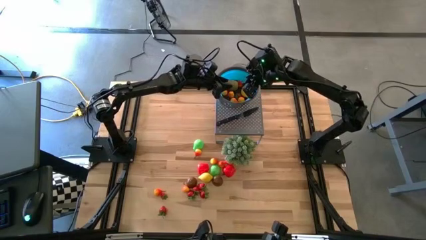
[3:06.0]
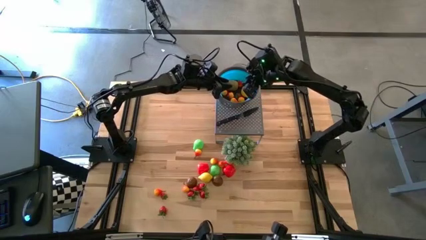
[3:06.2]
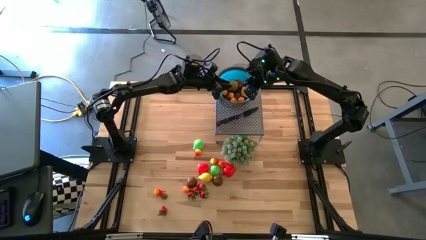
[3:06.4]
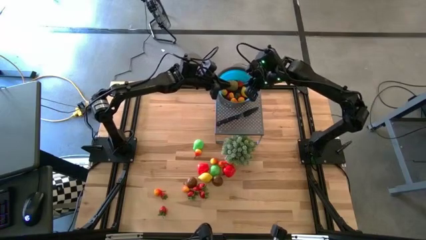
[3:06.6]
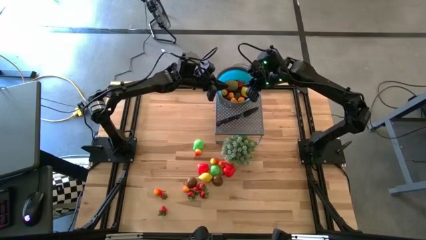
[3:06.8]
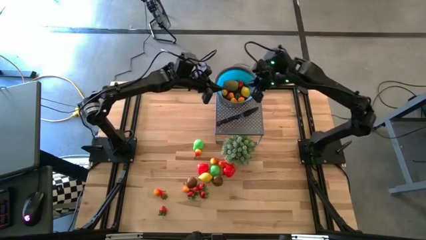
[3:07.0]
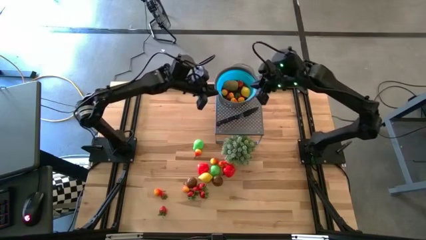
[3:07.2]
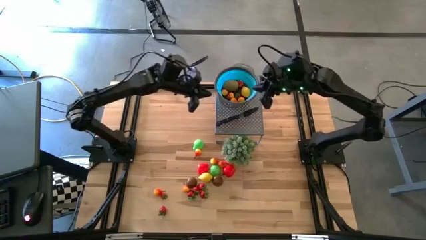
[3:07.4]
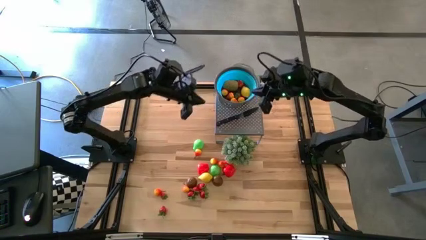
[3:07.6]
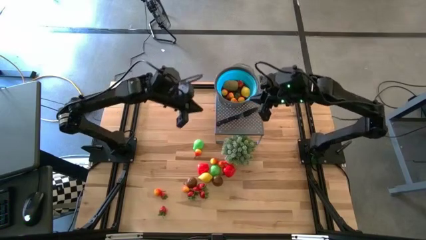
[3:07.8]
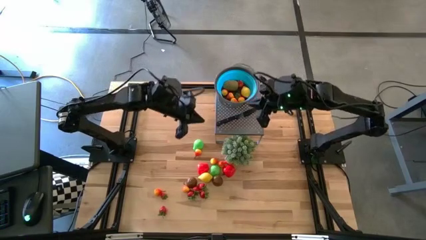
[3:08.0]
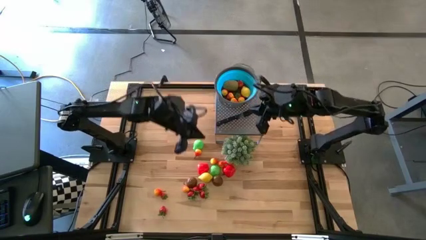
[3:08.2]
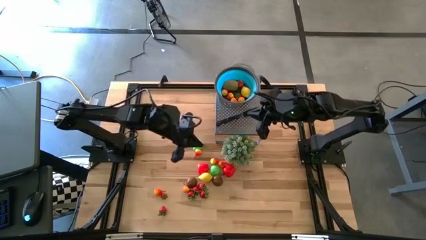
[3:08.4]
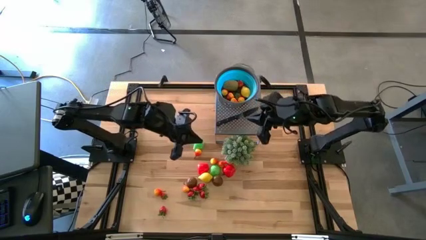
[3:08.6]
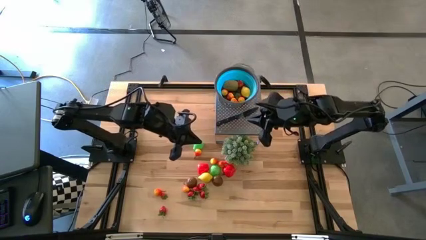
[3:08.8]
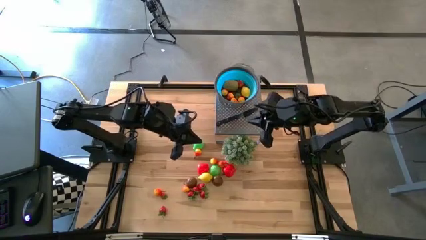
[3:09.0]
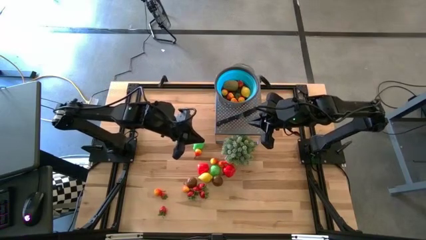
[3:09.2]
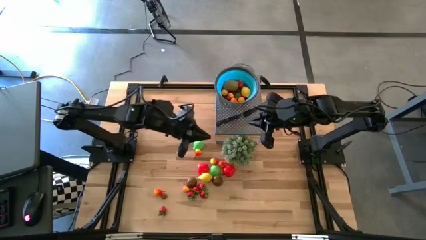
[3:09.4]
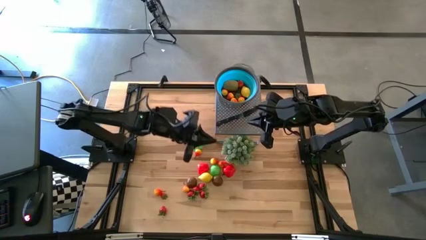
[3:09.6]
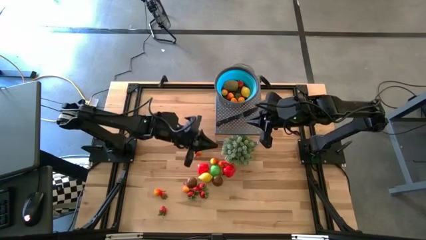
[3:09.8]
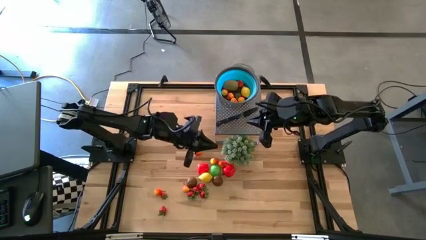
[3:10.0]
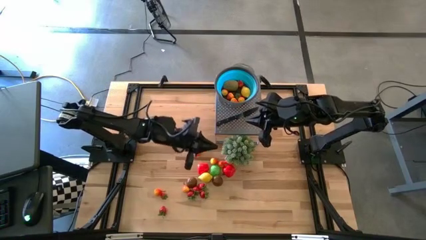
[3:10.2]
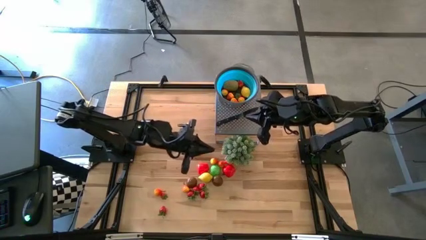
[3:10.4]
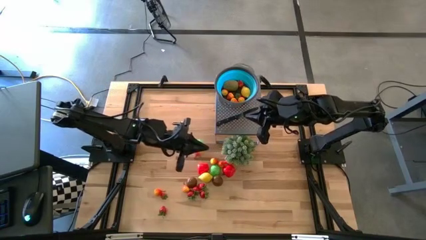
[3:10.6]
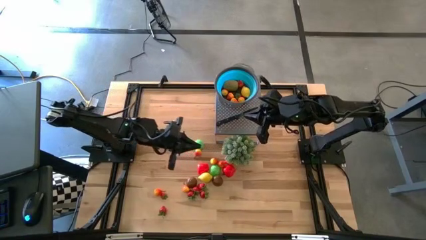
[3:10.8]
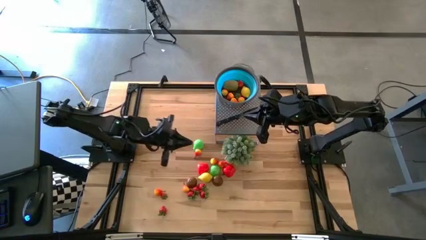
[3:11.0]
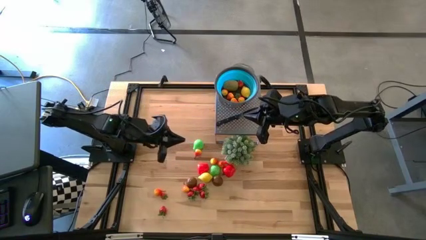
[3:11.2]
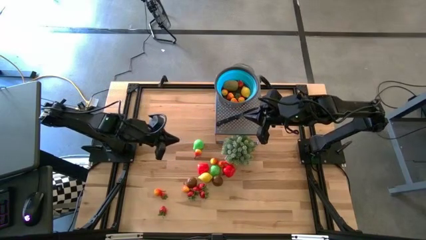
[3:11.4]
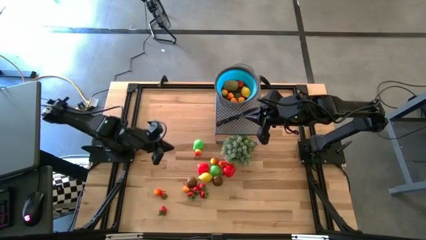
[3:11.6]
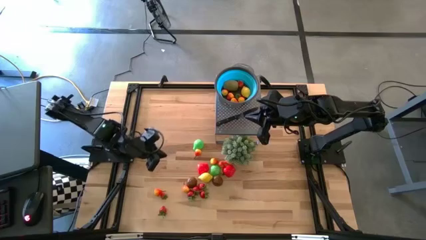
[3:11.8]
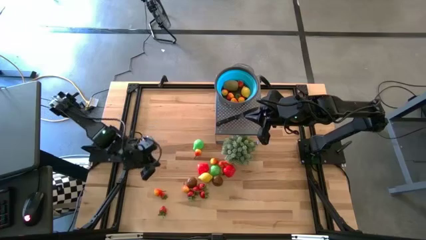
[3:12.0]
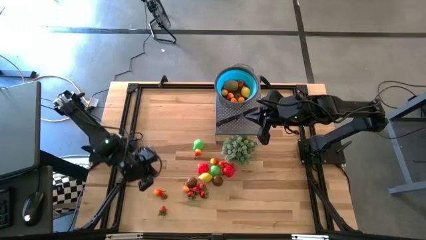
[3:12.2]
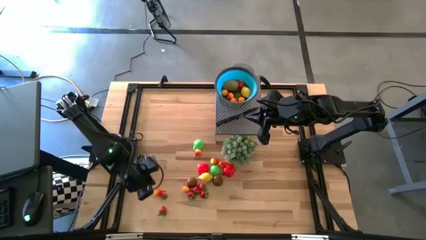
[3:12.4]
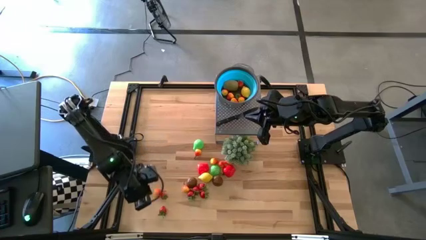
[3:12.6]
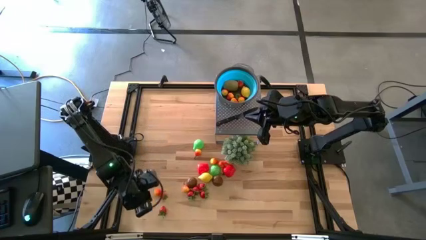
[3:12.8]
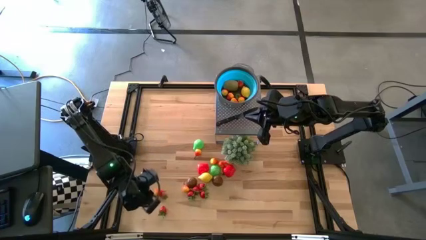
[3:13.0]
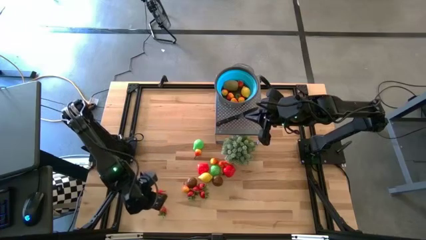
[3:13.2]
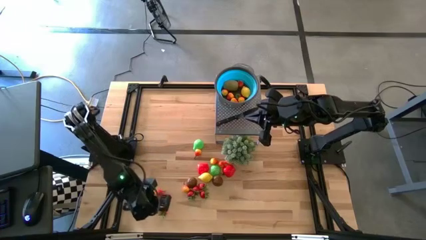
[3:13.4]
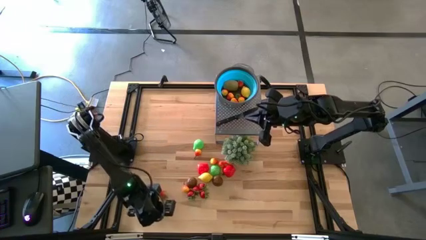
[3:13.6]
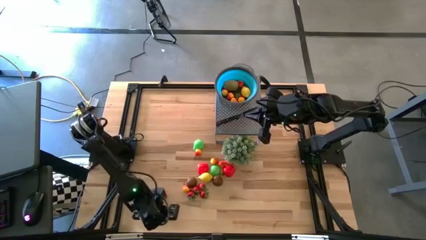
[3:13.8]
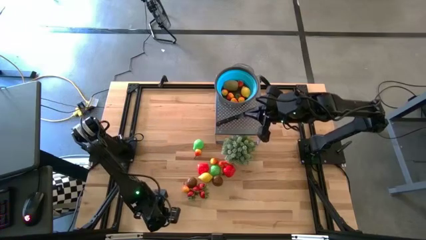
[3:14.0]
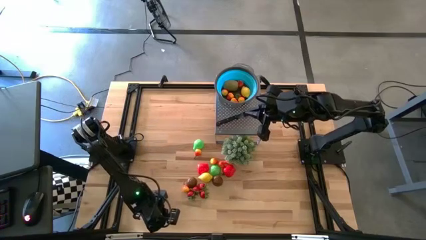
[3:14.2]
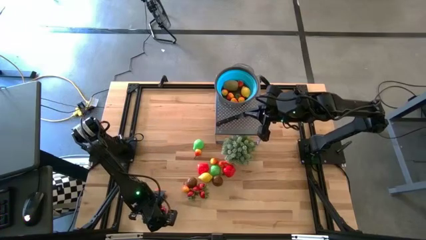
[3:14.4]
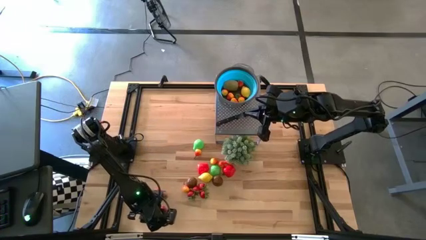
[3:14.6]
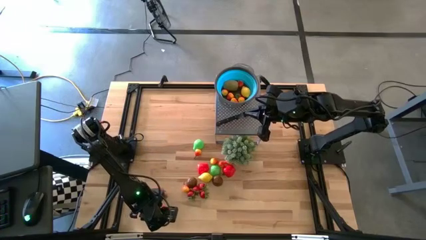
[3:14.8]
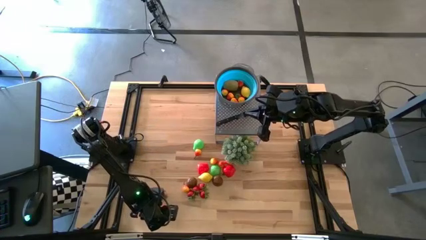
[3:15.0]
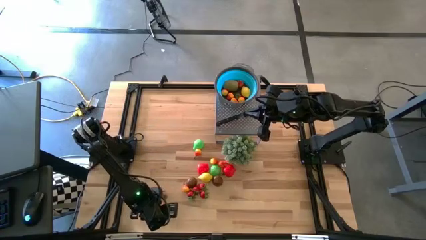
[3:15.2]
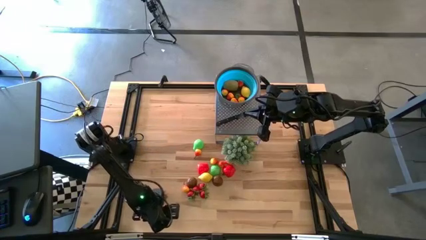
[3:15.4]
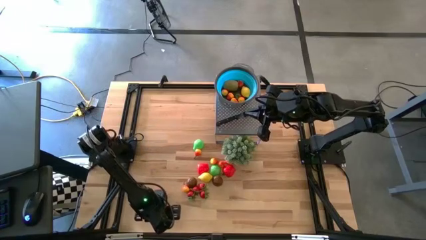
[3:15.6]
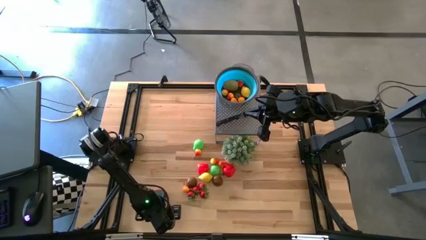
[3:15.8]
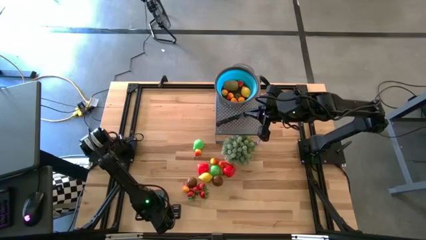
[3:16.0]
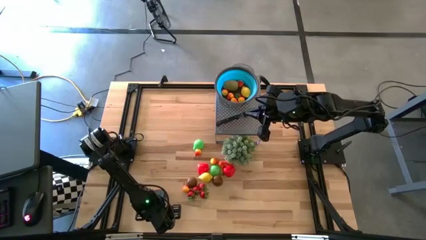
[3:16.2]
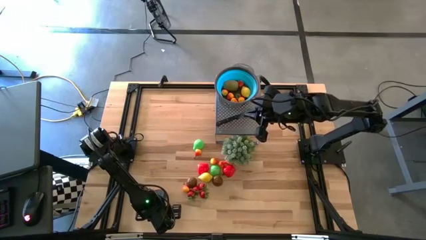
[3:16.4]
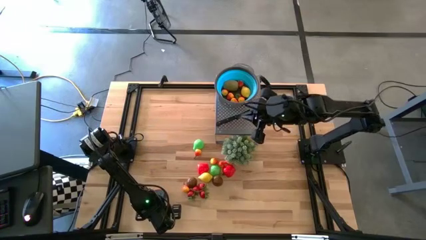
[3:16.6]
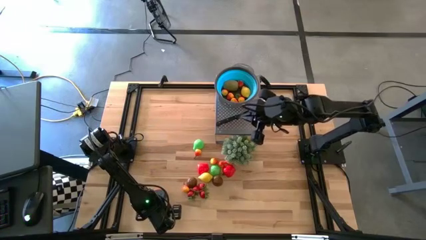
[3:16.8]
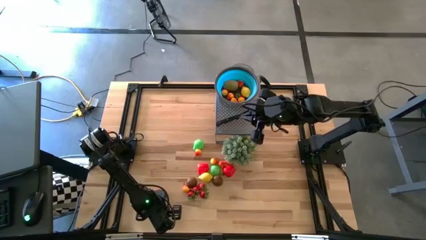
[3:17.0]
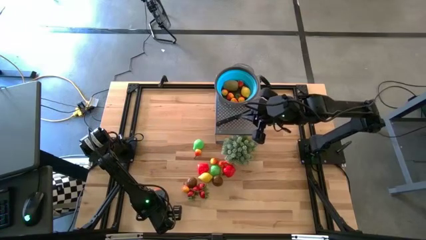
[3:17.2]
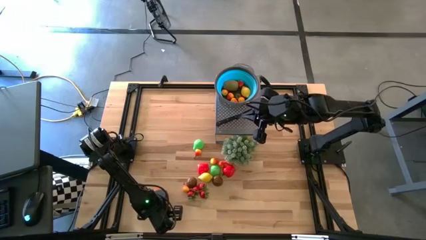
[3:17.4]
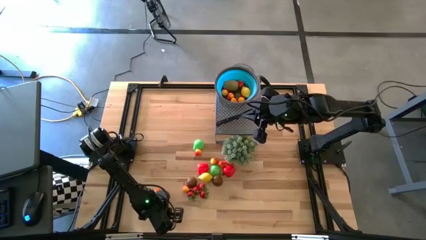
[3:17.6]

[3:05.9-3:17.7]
Task: Pick & Place Fruit
Put the red strawberry into the blue strainer bowl

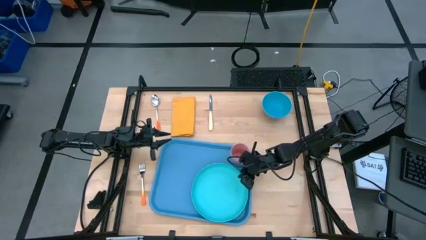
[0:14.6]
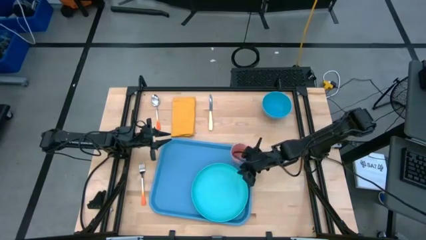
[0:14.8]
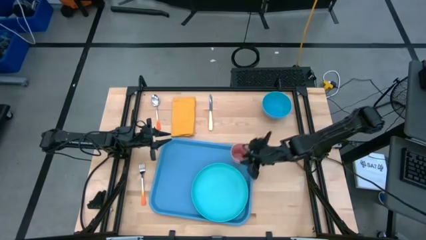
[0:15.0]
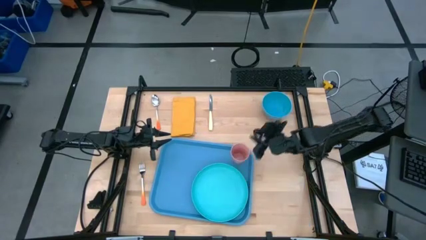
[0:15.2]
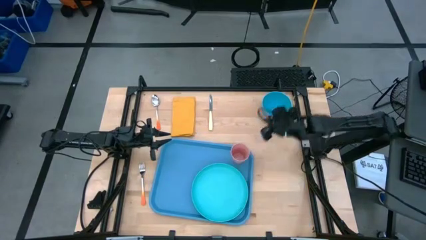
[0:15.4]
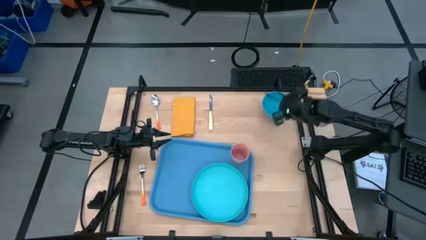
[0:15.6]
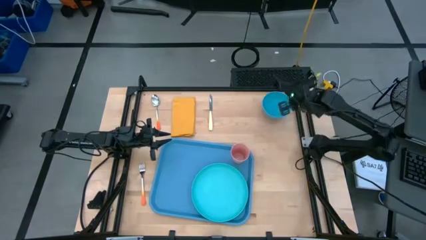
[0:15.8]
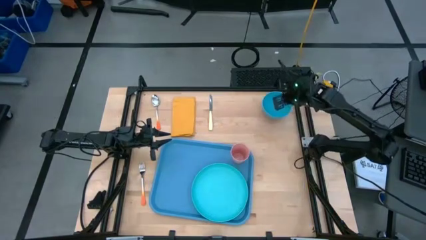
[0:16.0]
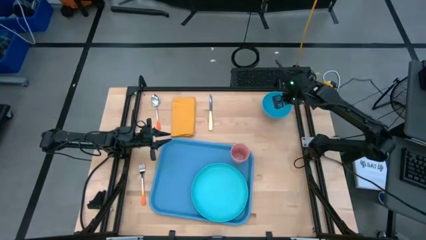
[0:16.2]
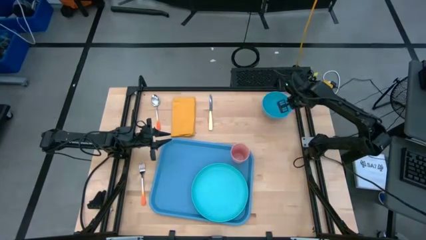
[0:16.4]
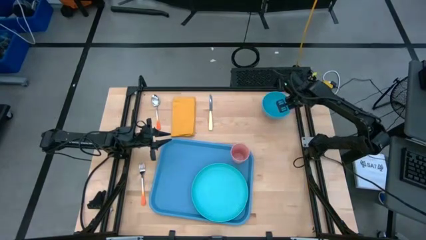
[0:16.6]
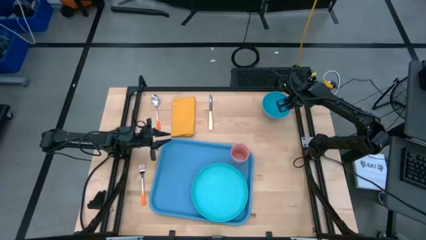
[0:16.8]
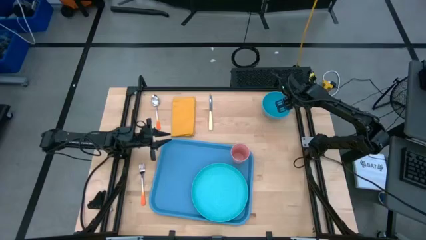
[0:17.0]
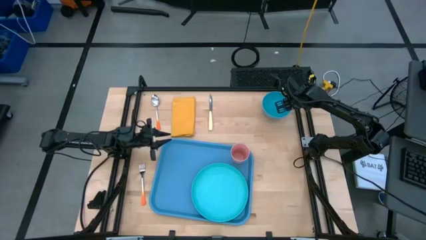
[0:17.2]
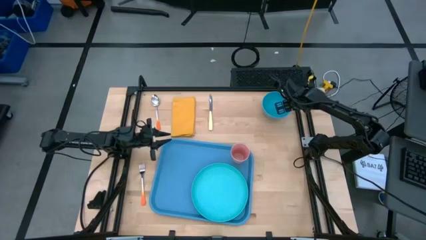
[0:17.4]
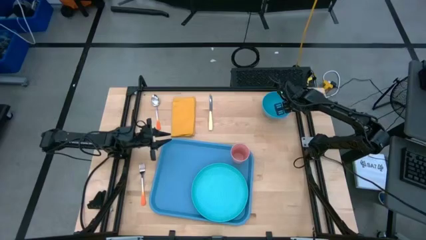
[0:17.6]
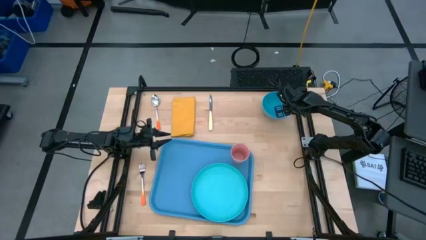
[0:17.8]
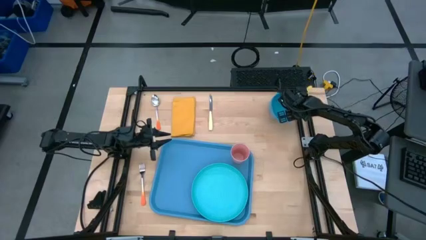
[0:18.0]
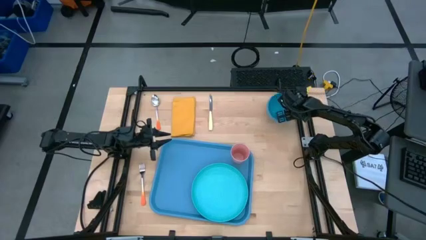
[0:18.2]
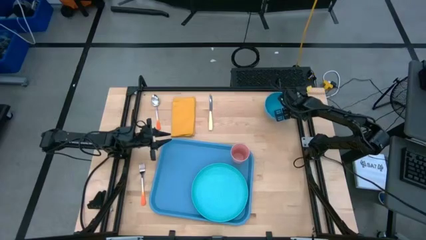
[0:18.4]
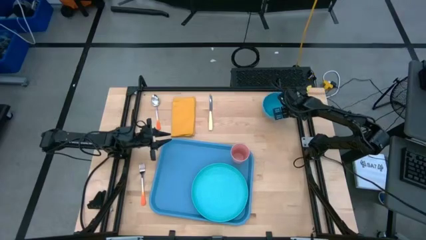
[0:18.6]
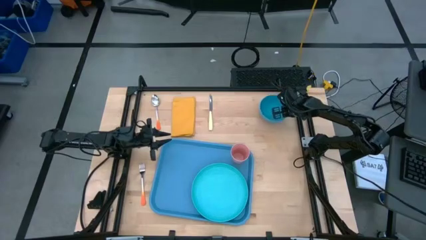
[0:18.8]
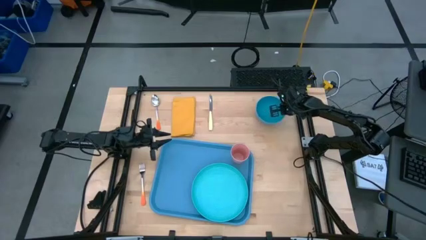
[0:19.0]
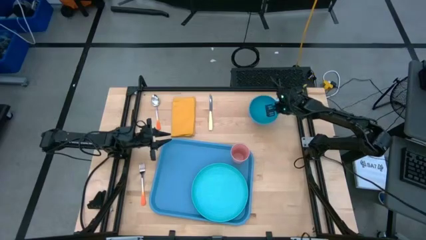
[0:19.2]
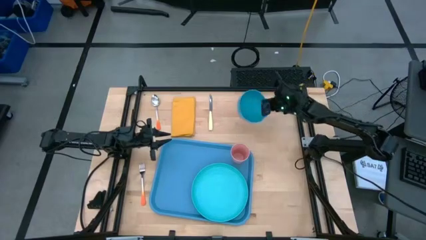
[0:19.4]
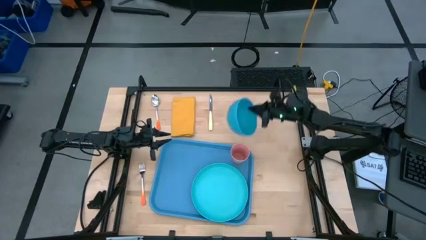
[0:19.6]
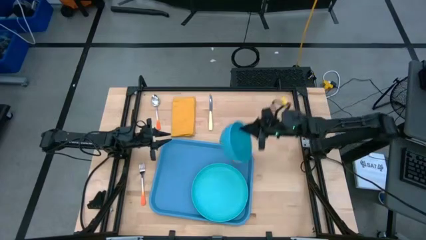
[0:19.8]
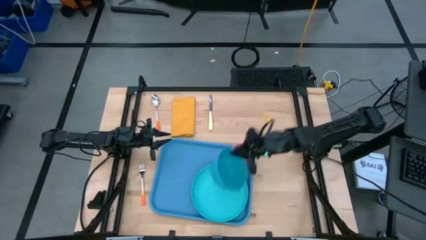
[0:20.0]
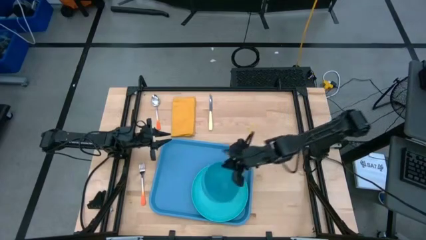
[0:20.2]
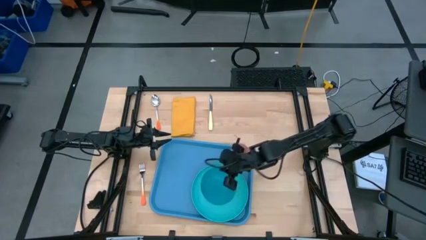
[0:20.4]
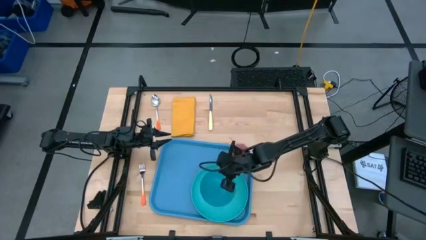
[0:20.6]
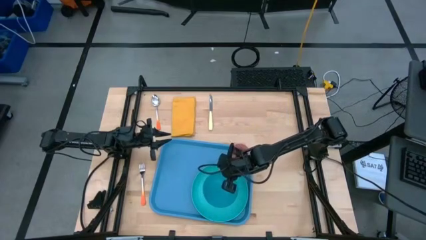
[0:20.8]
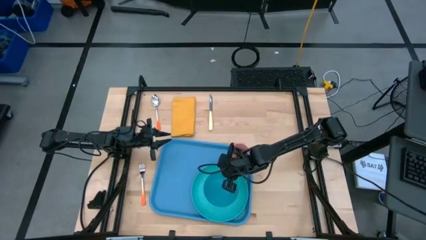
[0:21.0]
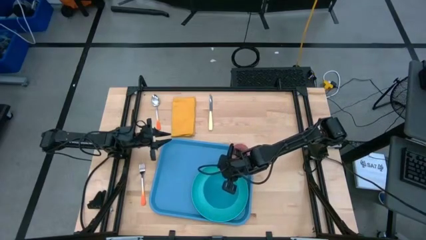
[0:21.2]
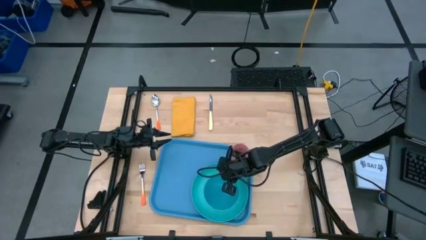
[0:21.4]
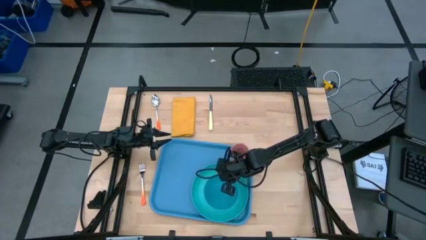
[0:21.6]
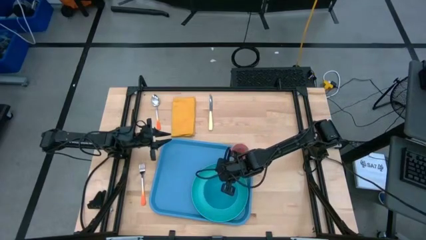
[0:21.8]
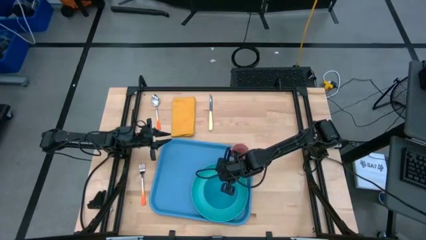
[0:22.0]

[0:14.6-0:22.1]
Task: Set up tray
Put the blue bowl on the blue plate on the blue serving tray
